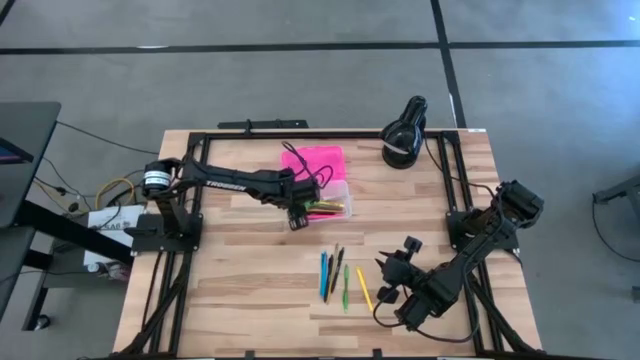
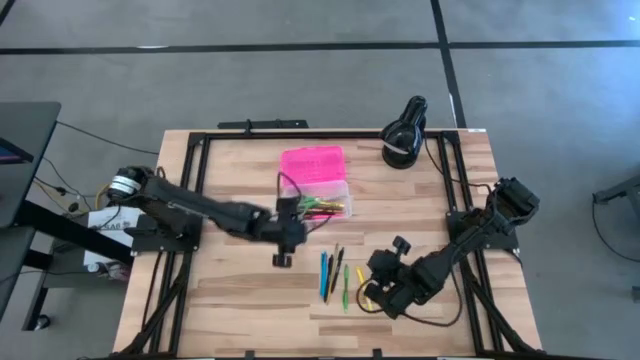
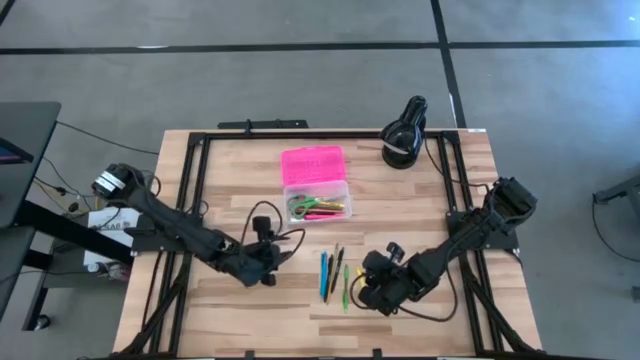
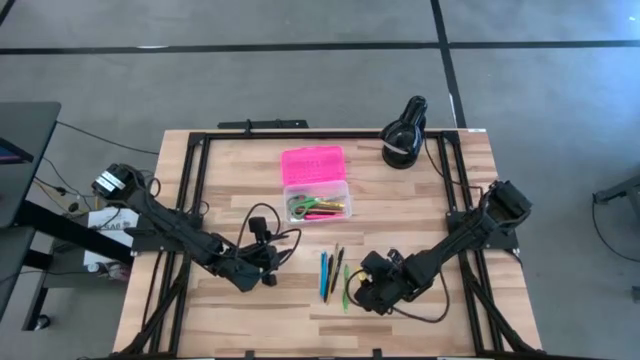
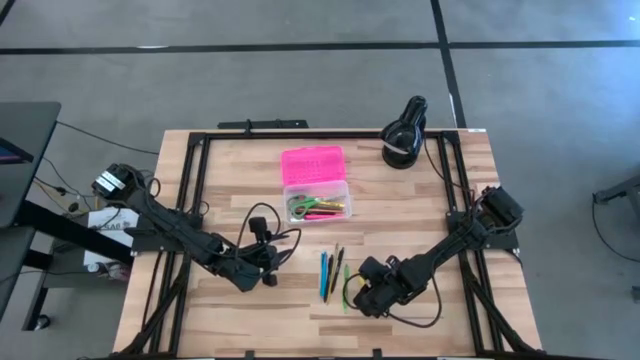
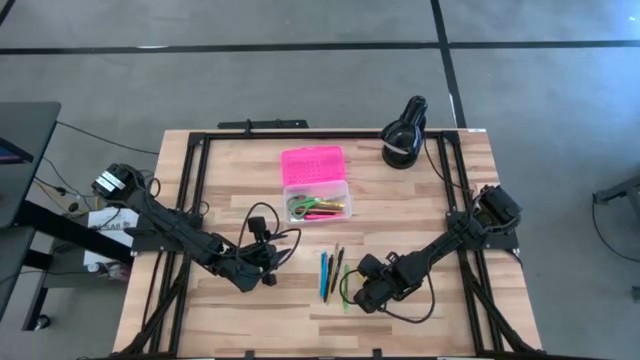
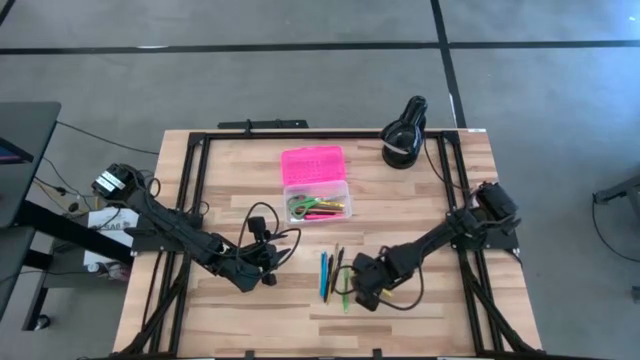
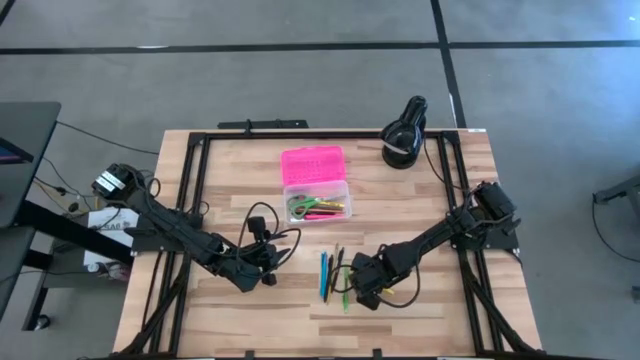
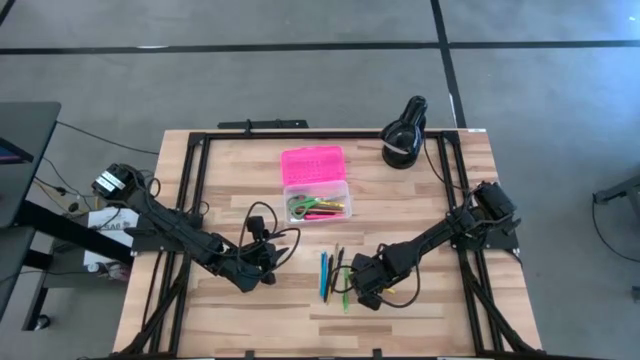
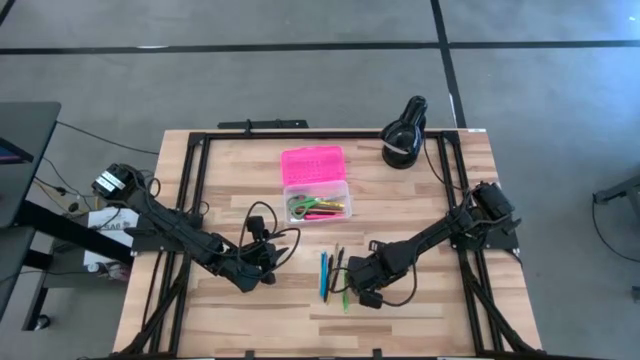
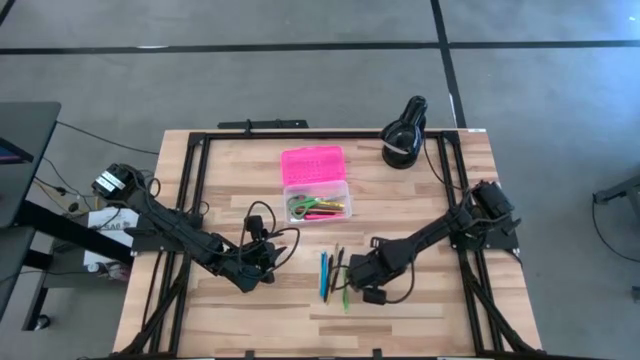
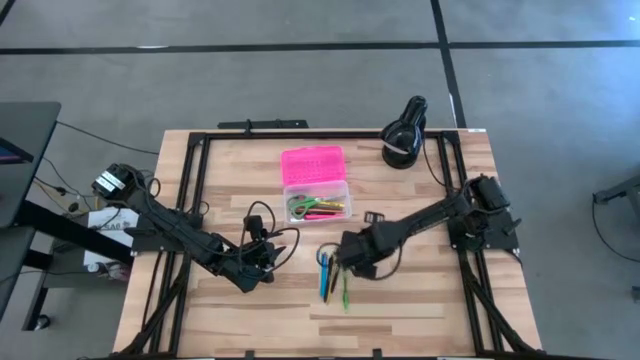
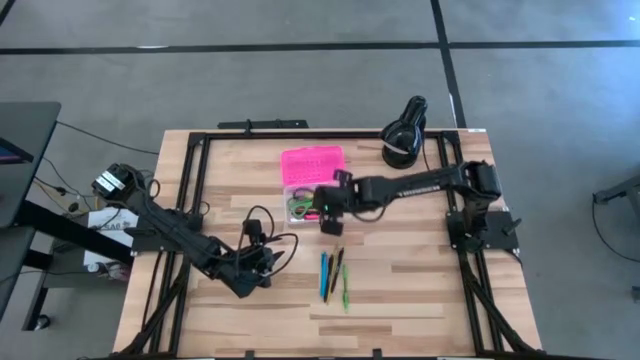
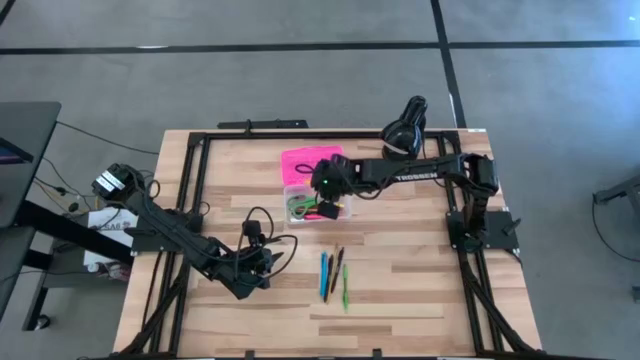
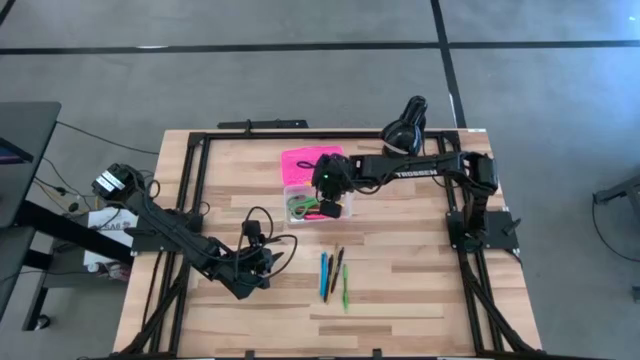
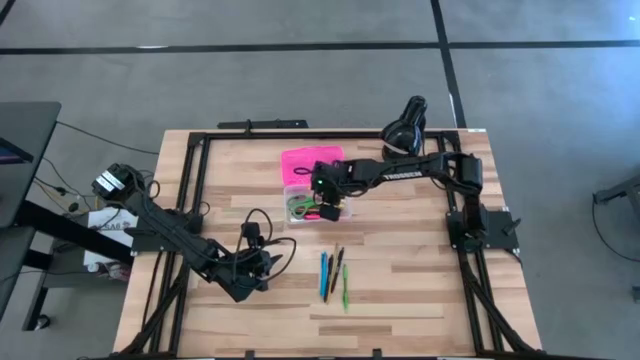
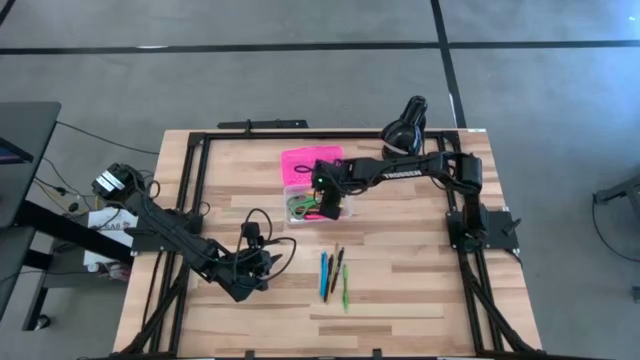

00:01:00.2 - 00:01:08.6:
Task: Pick & place school supplies into a supply box
Put the yellow pen into the supply box

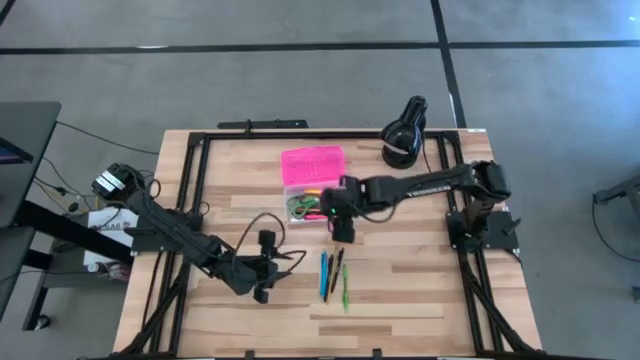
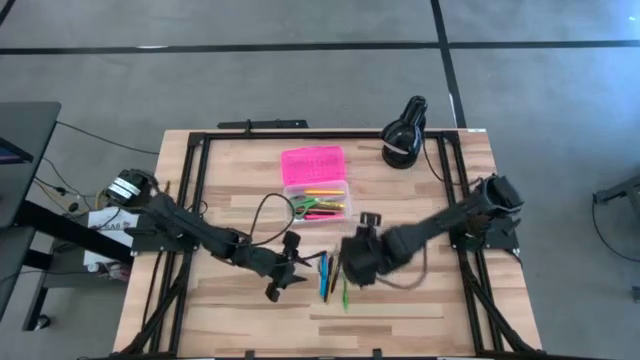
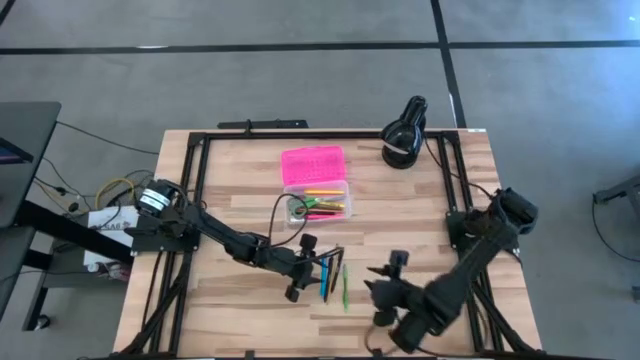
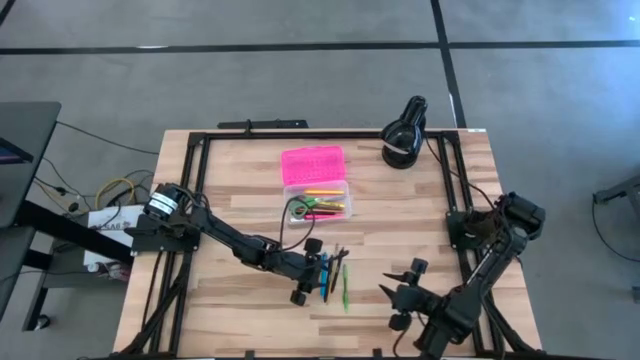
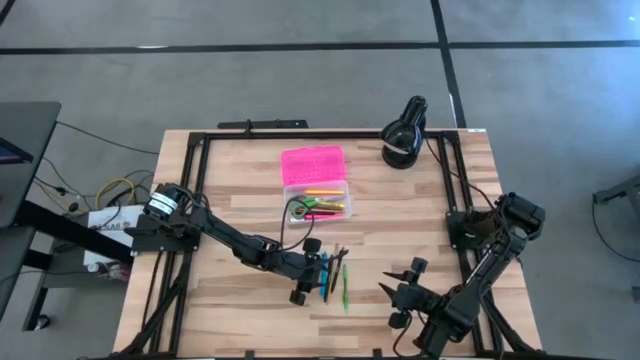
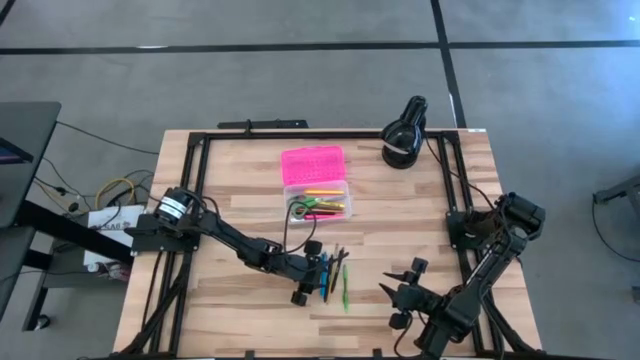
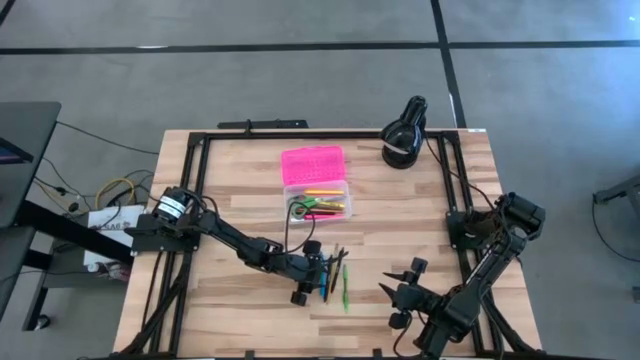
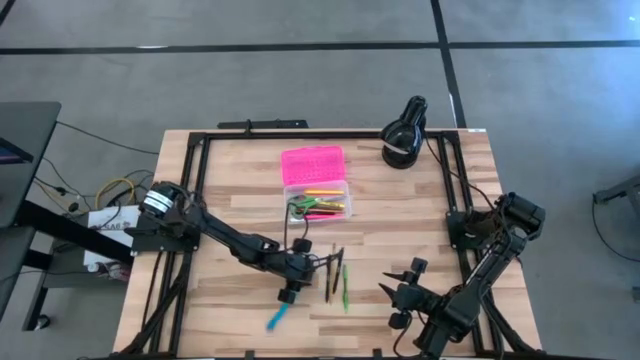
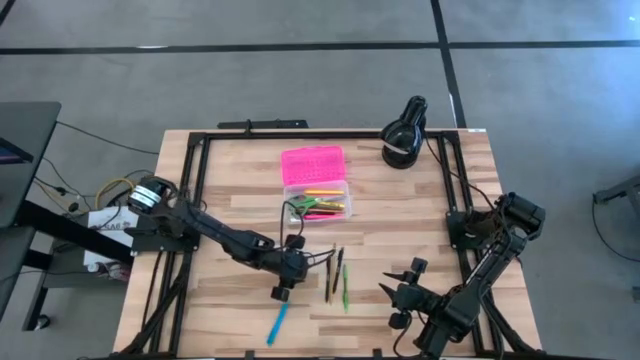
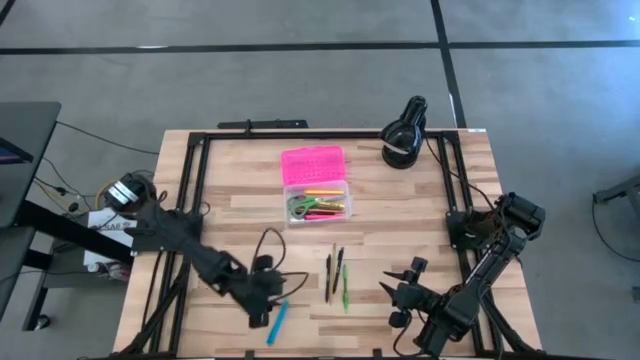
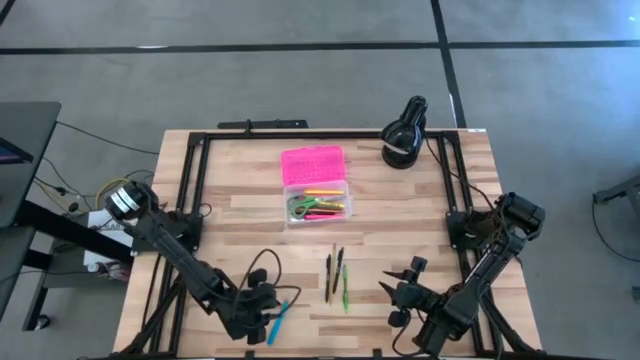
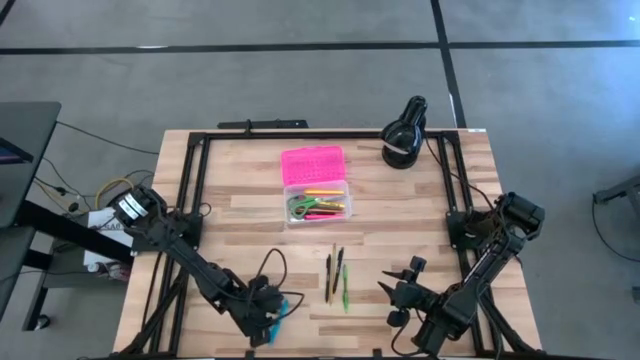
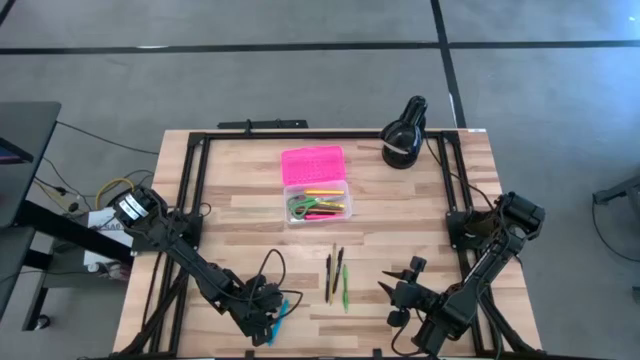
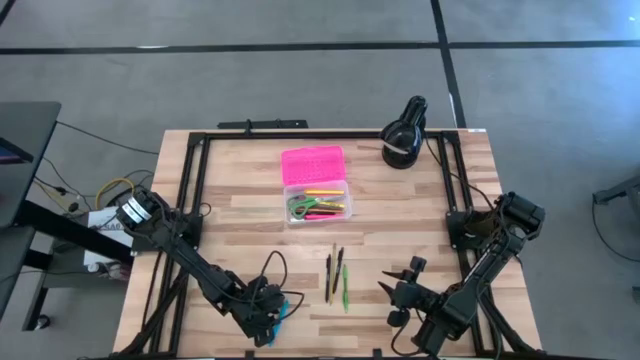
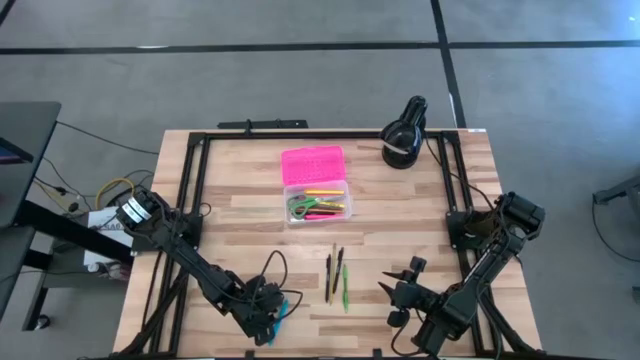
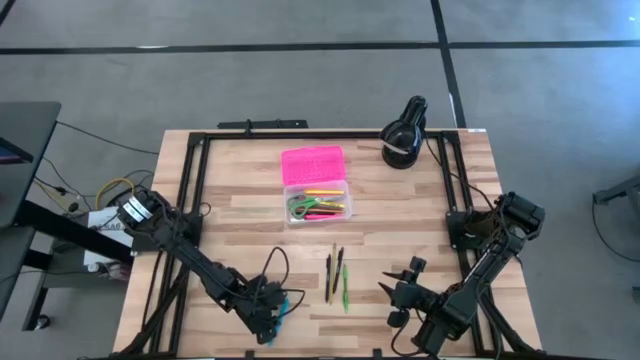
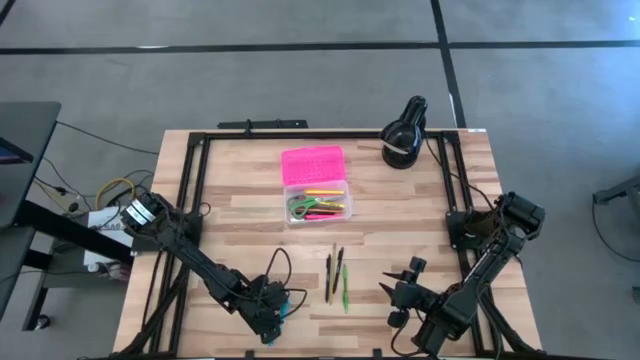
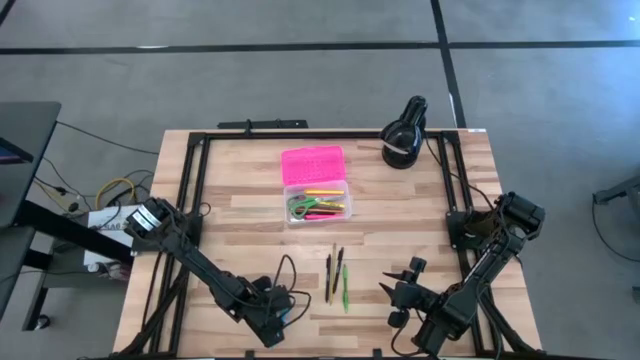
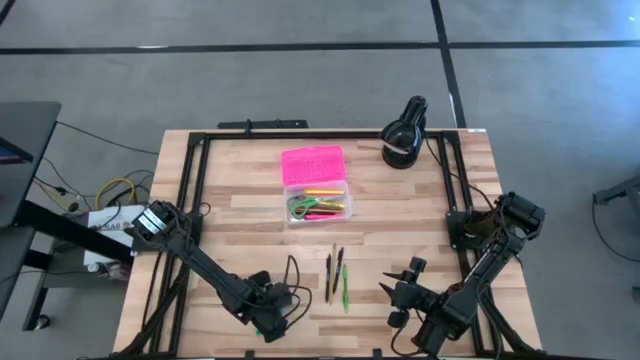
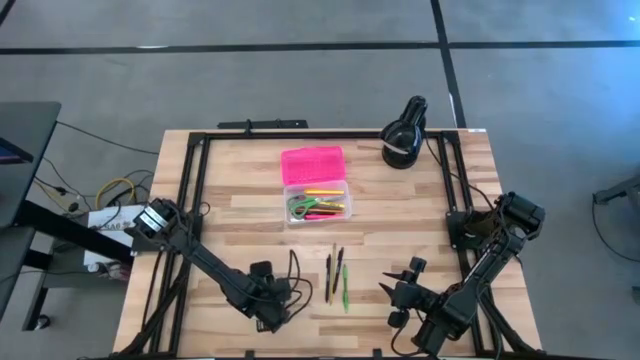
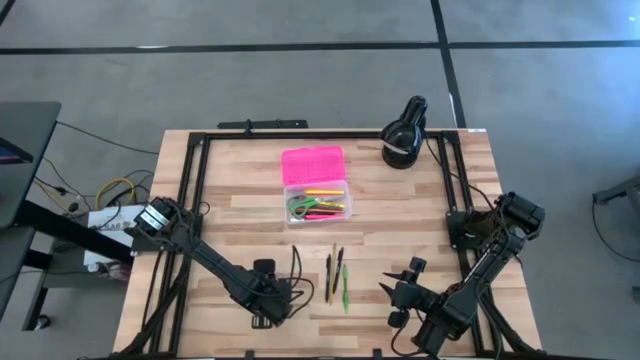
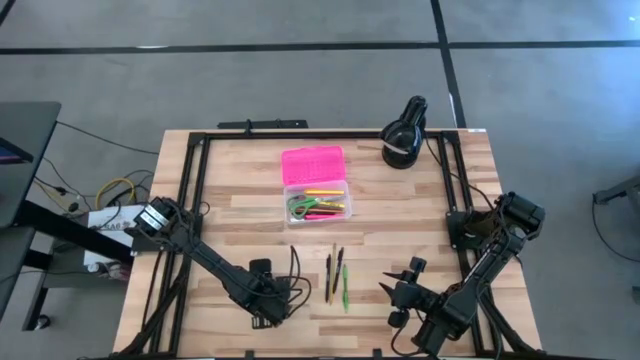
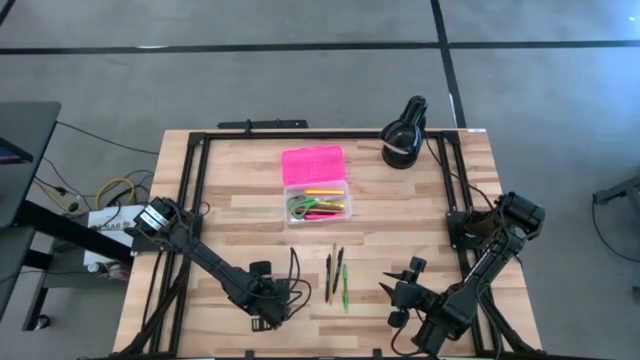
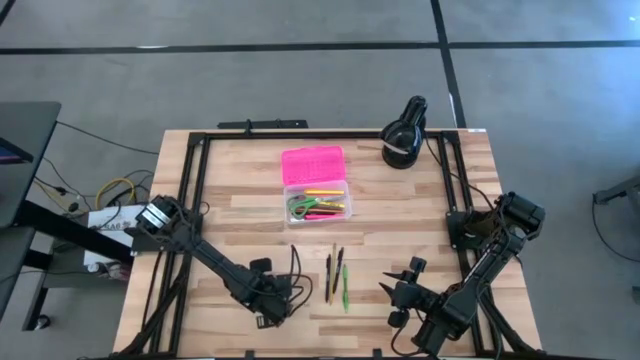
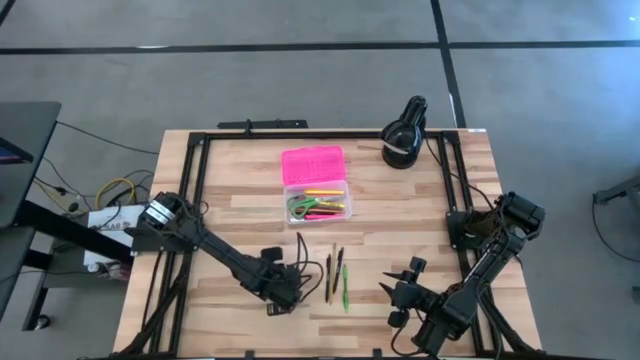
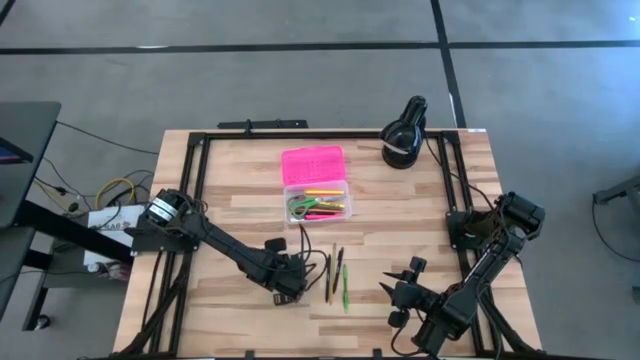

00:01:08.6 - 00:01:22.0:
Put the blue pen into the supply box
